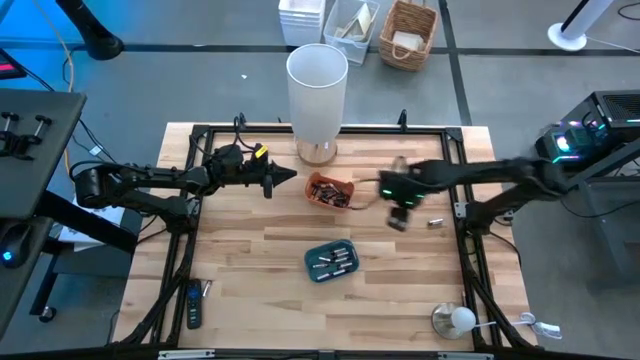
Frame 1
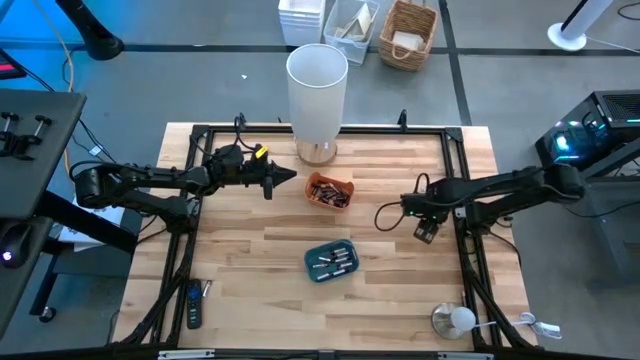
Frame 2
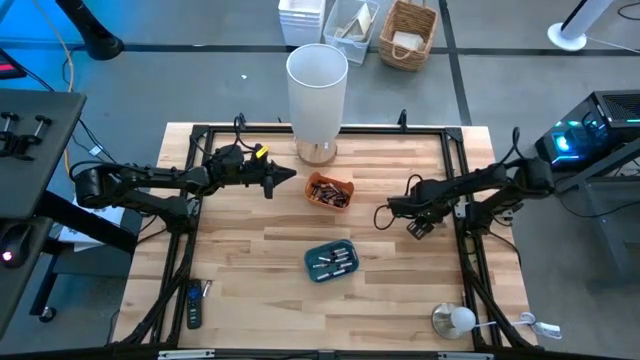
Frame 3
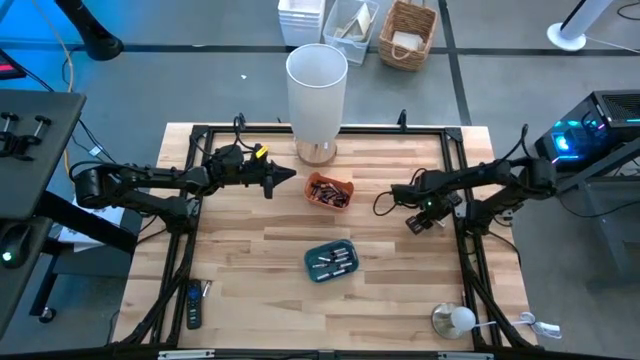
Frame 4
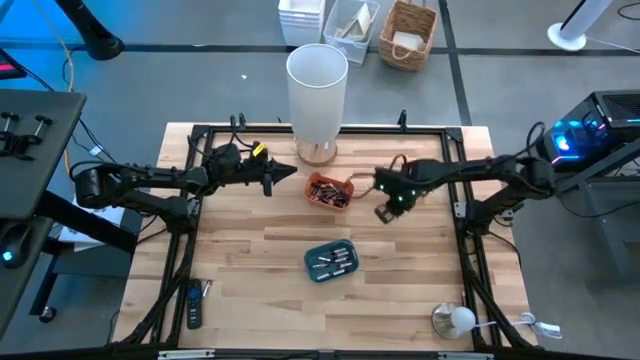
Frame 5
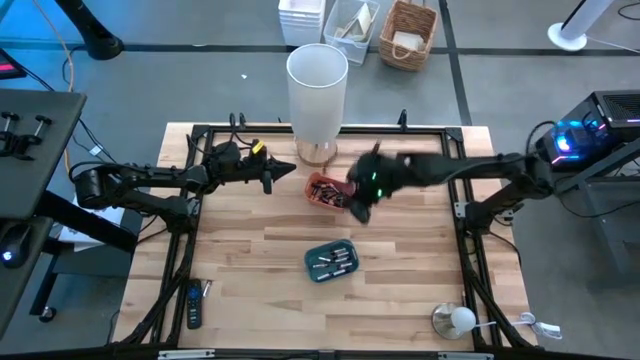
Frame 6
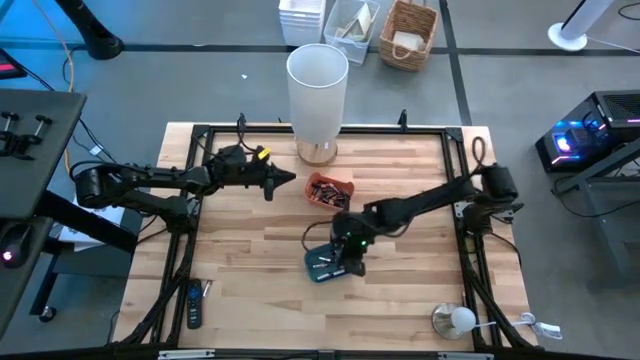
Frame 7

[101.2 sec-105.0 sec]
Task: Sort batteries
Put the silver battery into the blue bin

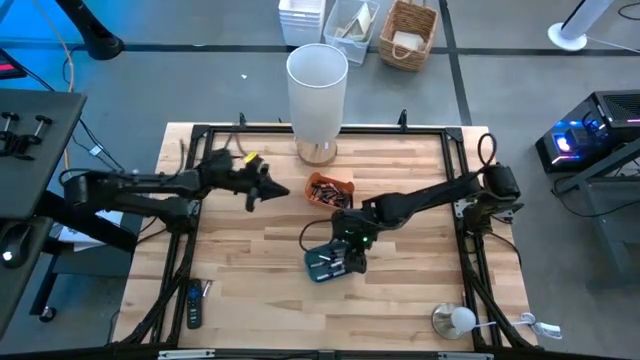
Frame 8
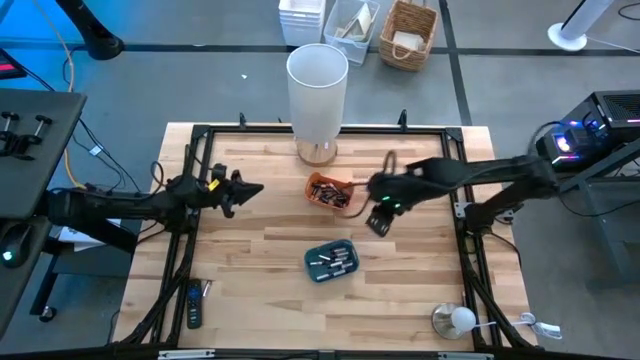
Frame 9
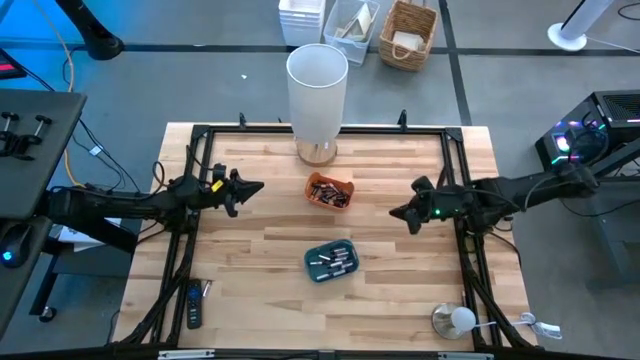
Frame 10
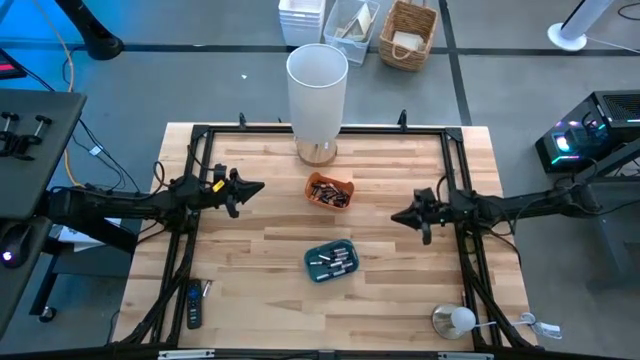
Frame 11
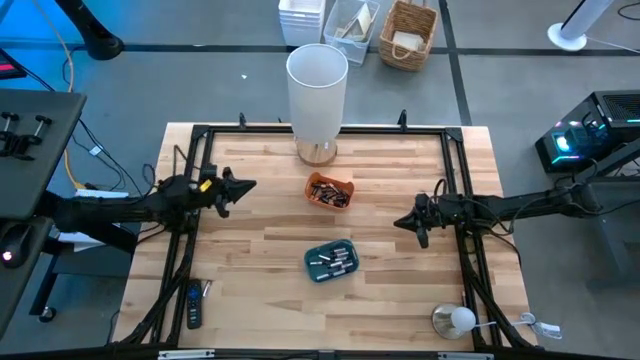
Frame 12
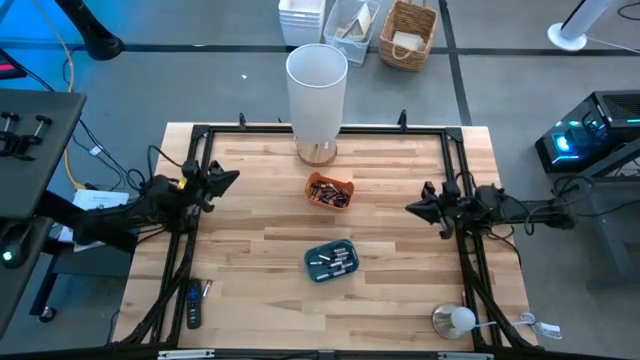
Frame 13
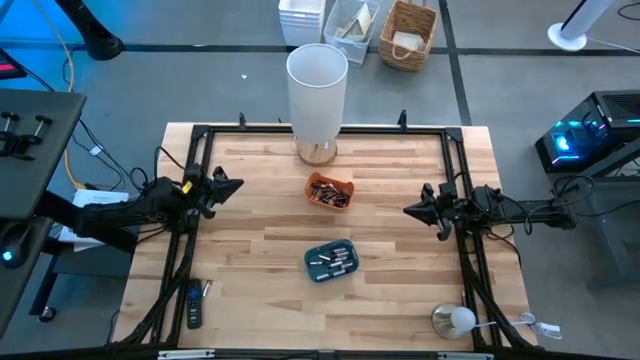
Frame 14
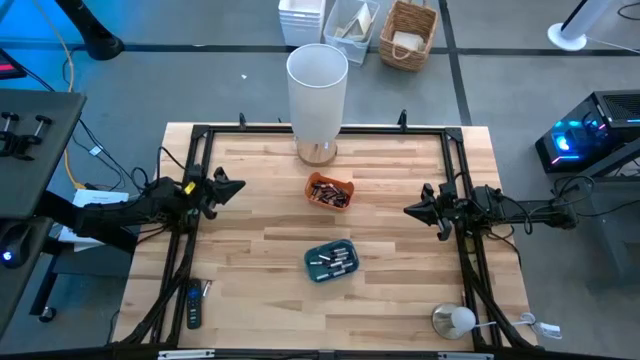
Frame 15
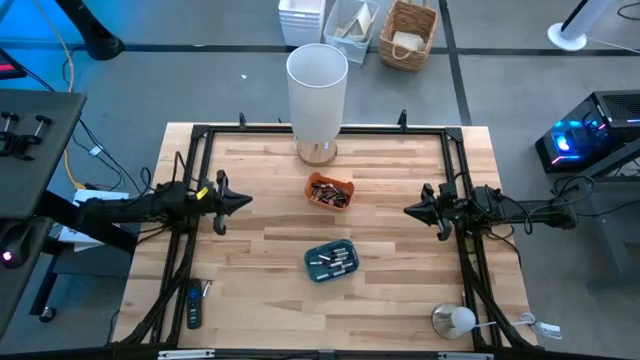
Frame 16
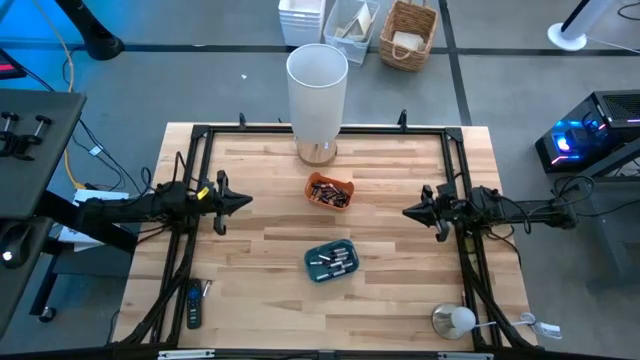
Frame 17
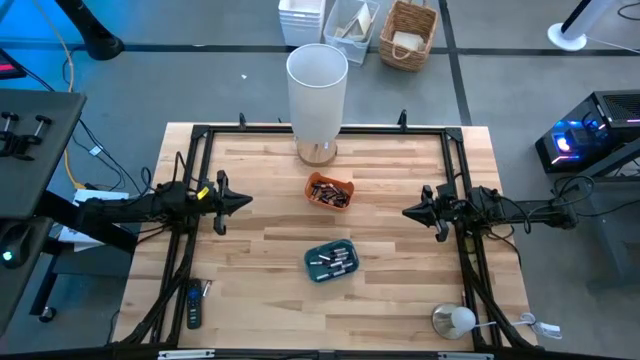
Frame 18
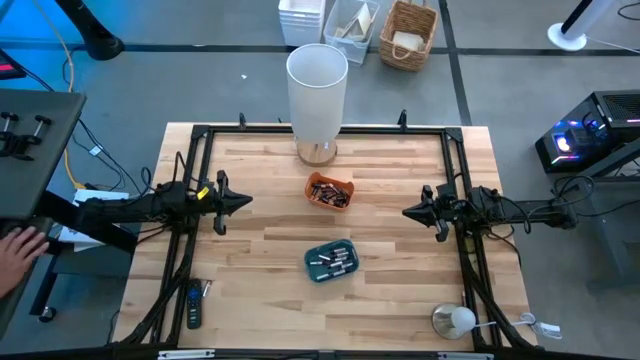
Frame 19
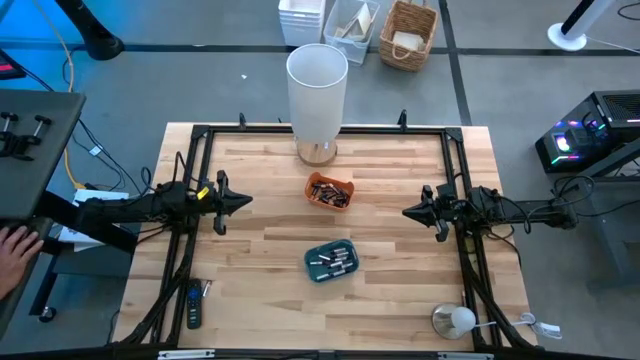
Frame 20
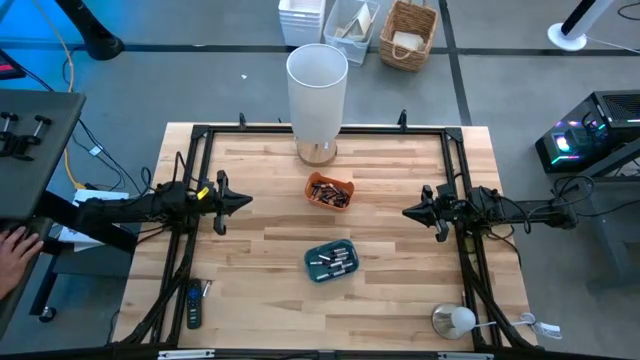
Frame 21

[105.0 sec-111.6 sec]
Return to Home Position

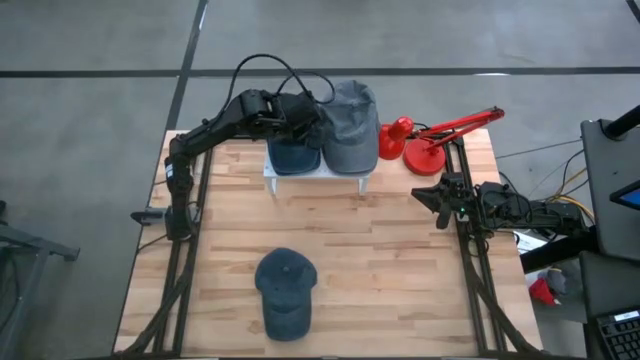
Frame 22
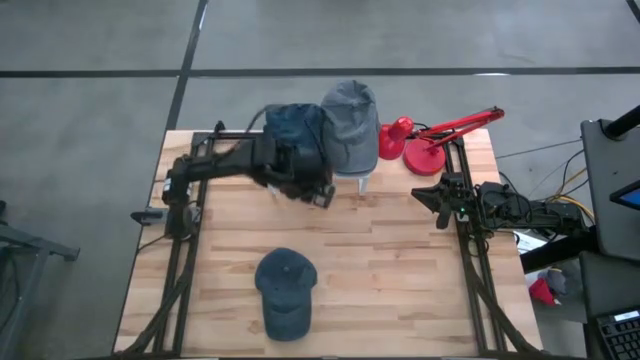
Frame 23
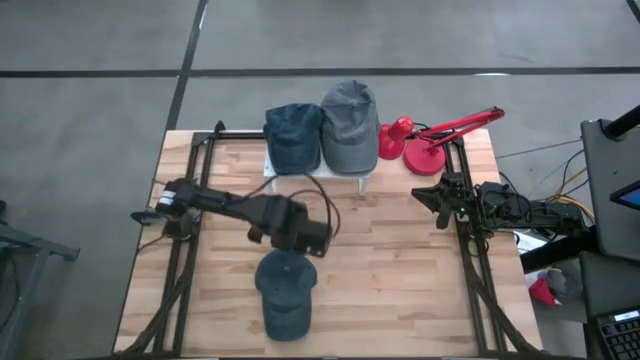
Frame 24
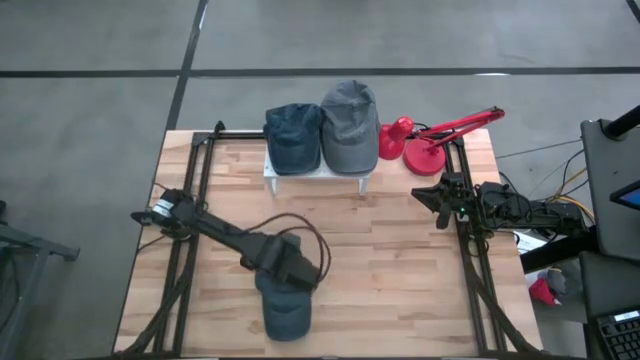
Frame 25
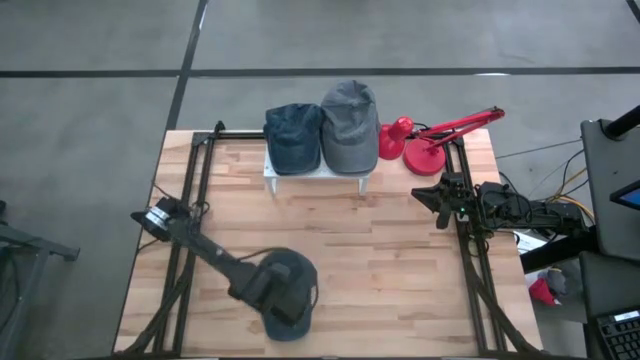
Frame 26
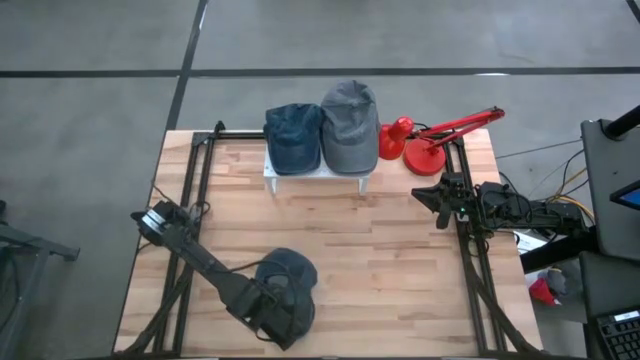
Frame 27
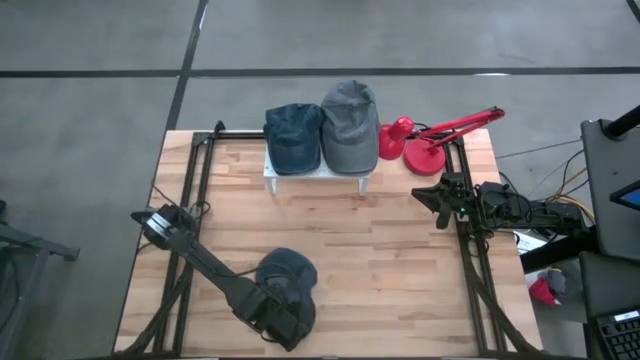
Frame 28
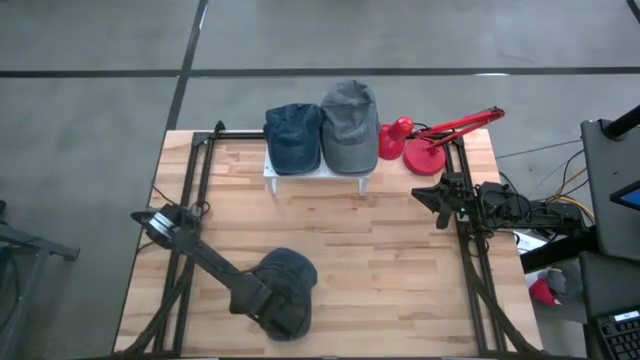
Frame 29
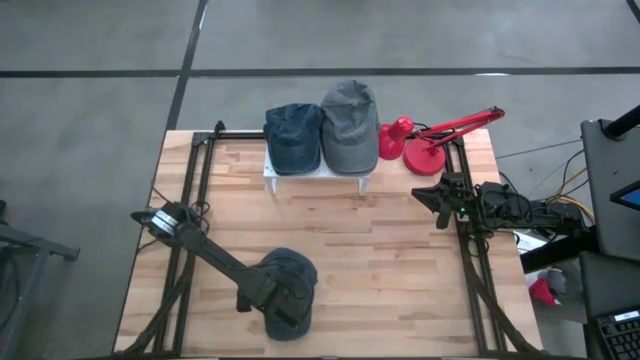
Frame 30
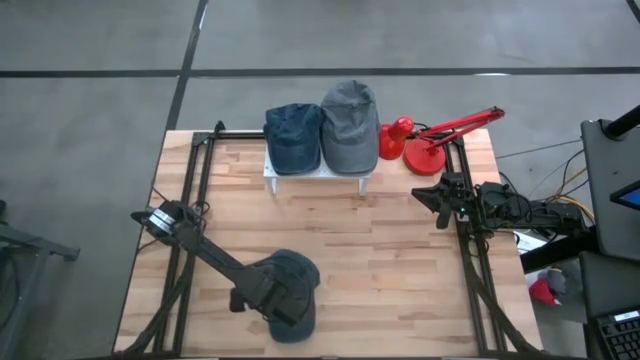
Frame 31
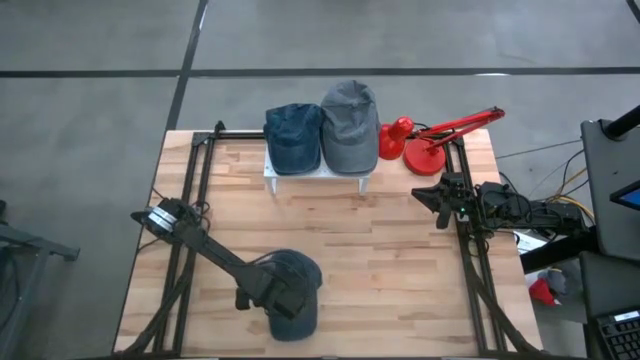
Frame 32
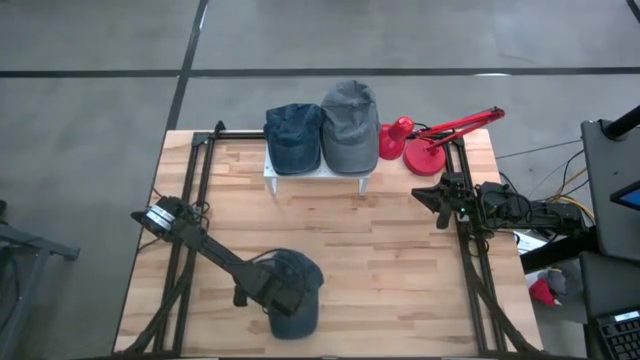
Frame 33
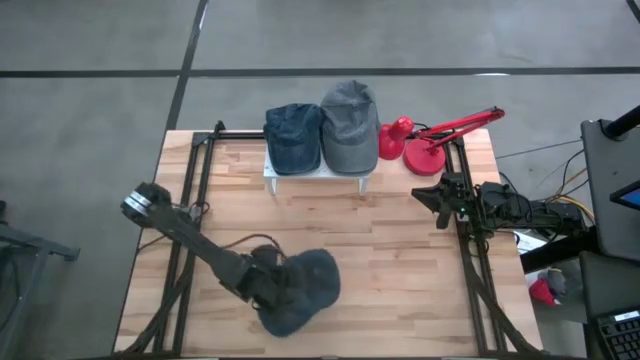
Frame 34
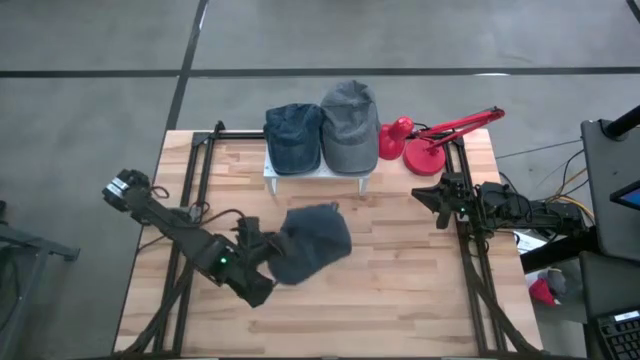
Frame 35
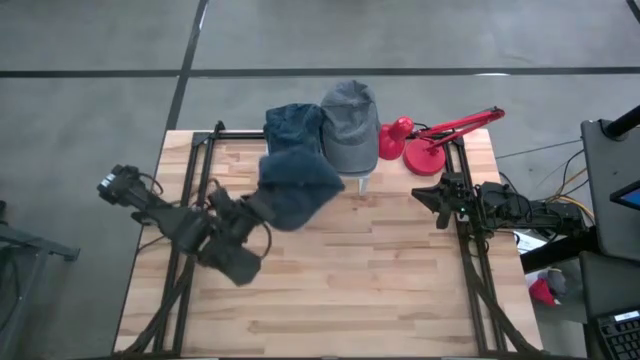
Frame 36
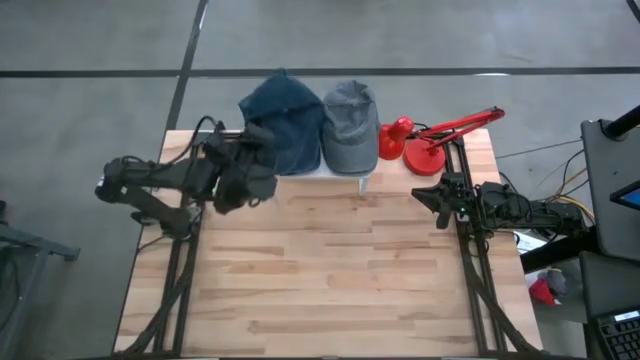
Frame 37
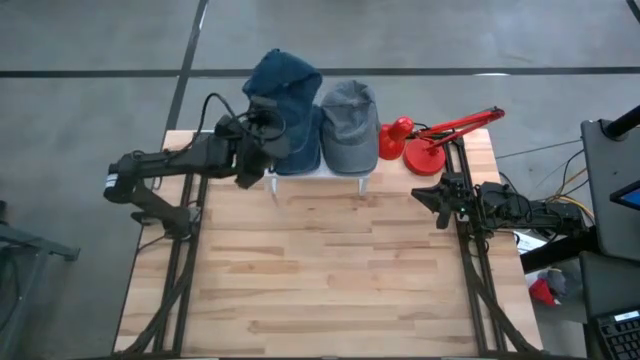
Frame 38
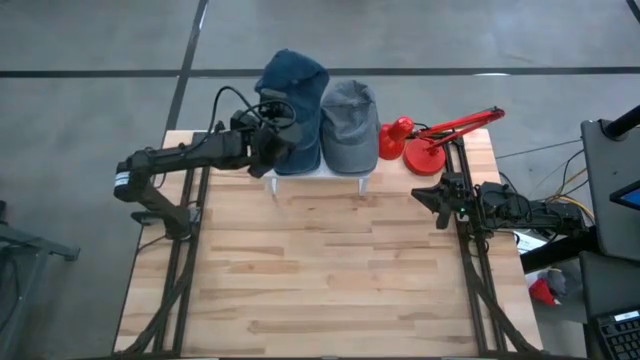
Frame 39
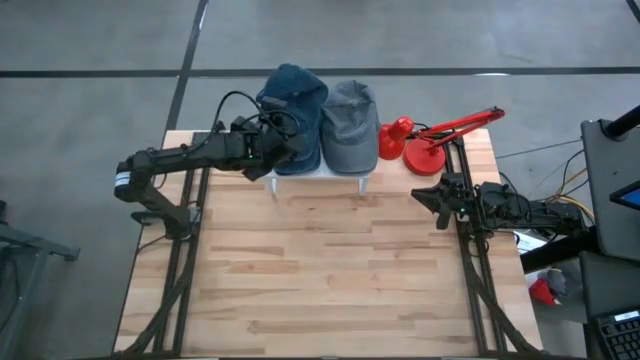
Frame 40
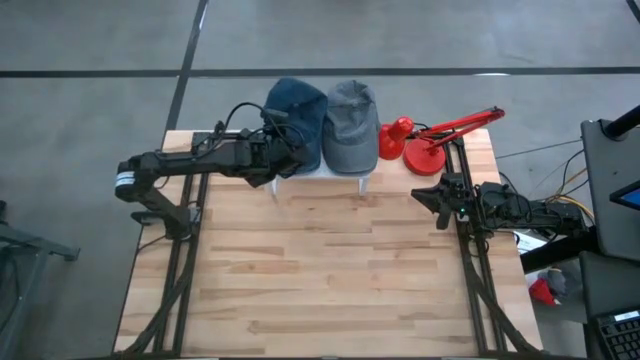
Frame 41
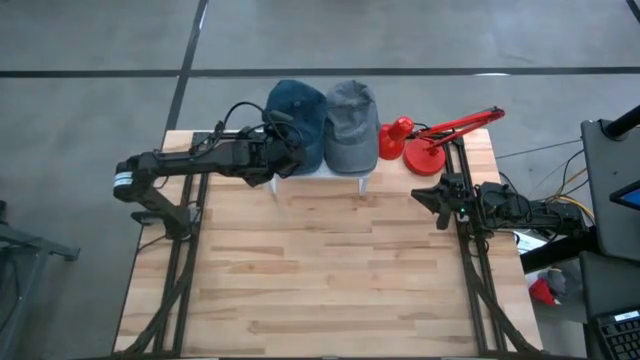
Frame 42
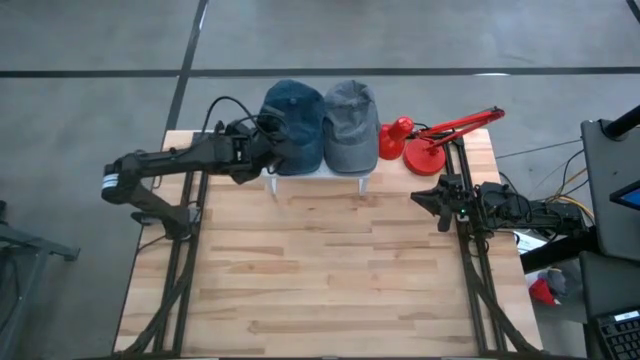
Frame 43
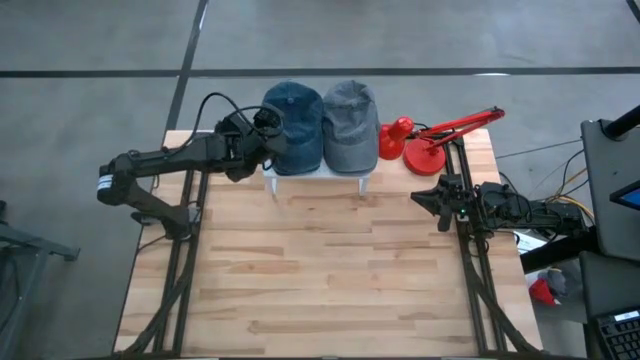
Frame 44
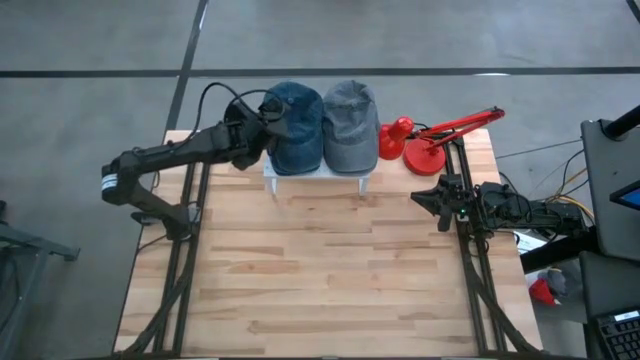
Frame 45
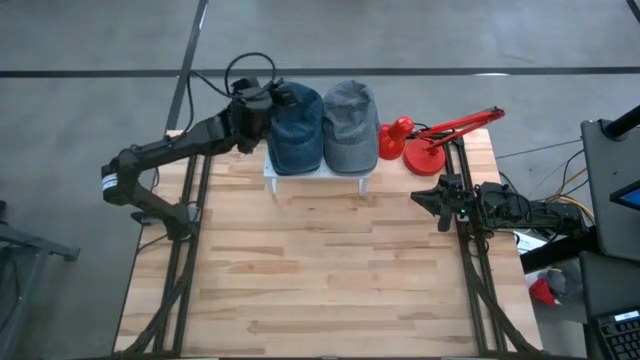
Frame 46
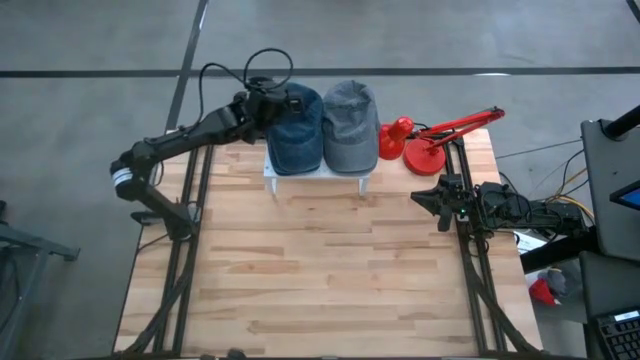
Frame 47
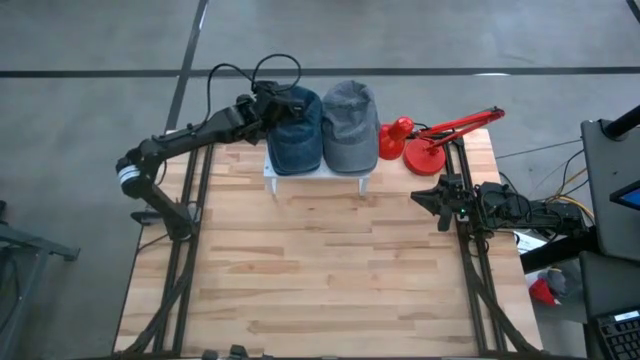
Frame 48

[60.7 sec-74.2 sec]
Task: Pick & Place hat
Stack the blue cap on top of the blue cap on the shelf
